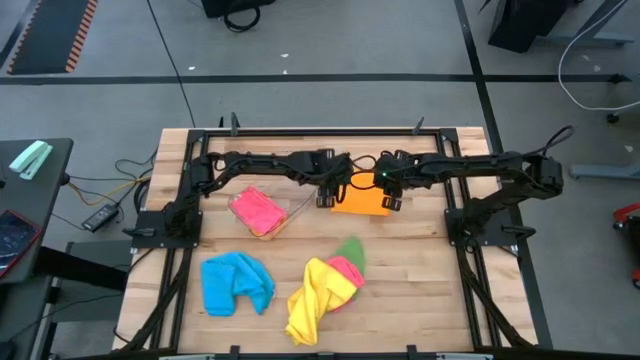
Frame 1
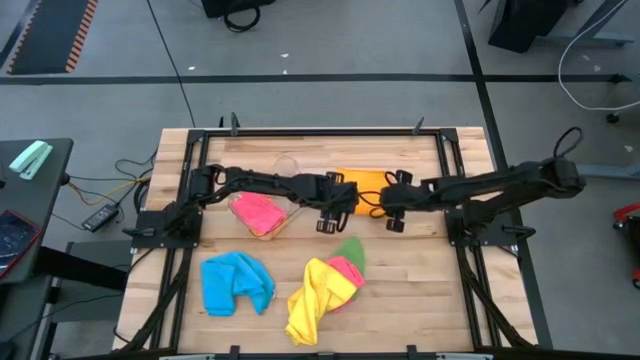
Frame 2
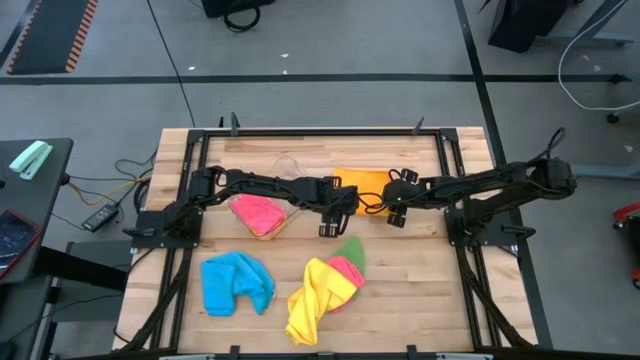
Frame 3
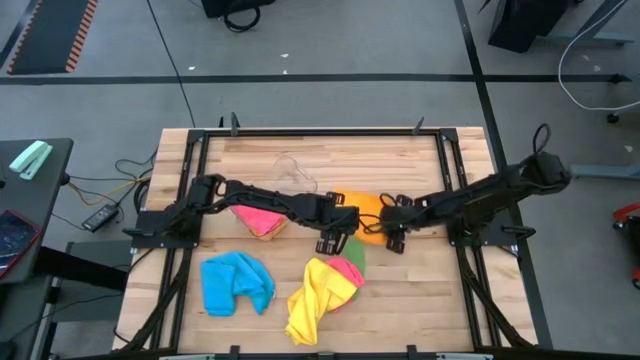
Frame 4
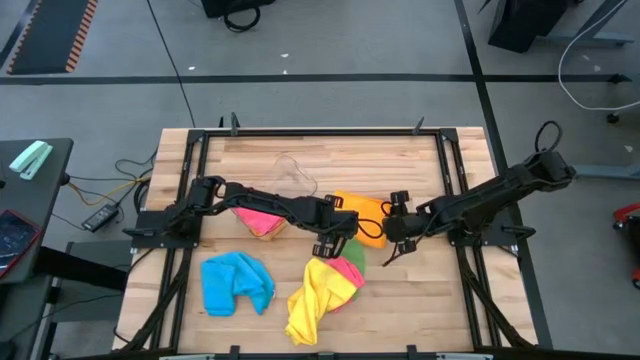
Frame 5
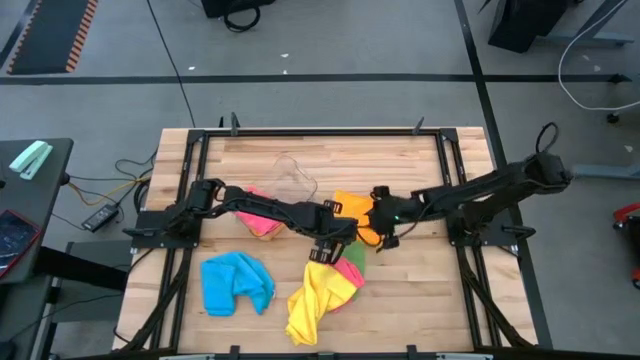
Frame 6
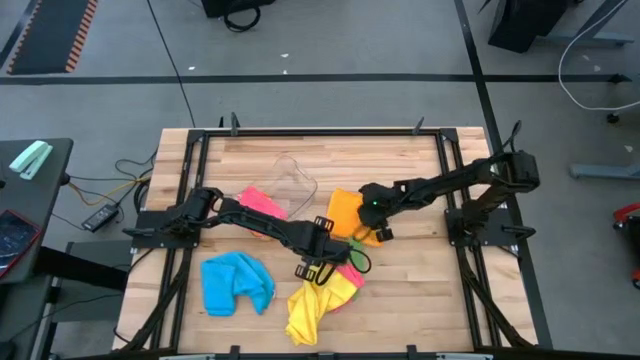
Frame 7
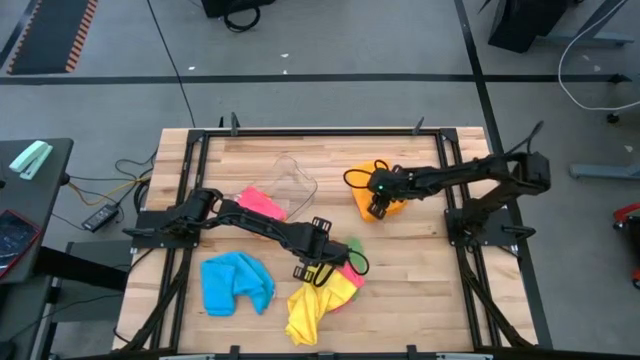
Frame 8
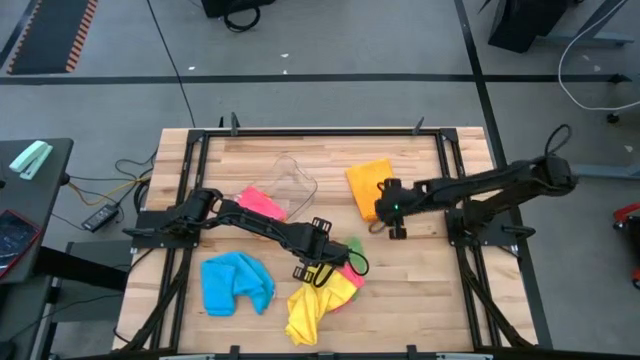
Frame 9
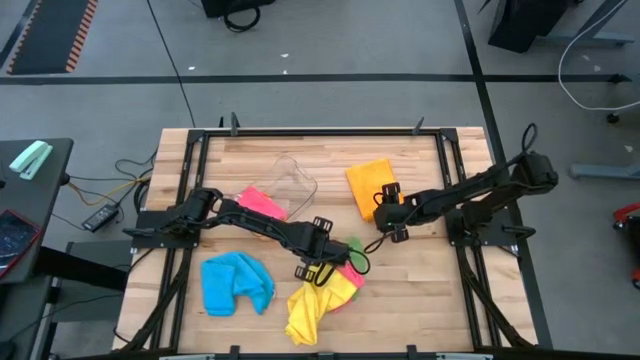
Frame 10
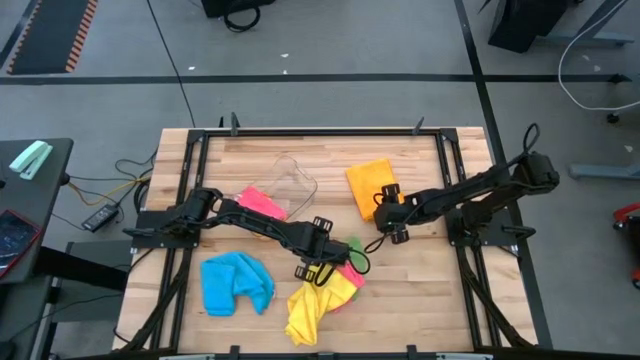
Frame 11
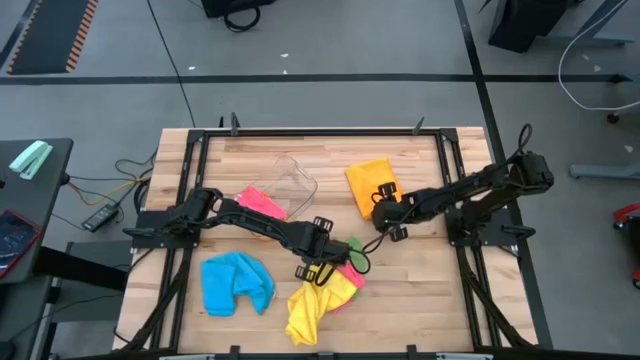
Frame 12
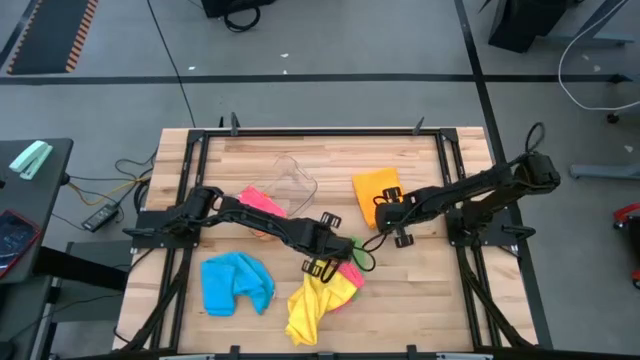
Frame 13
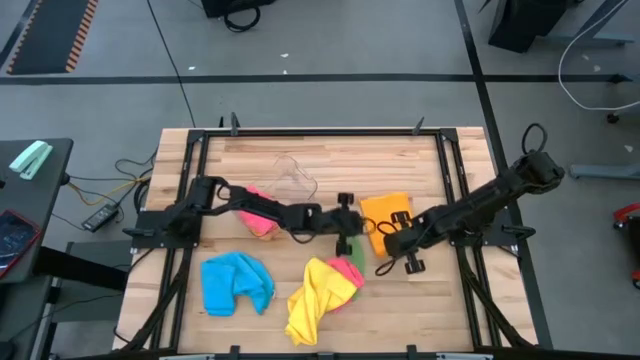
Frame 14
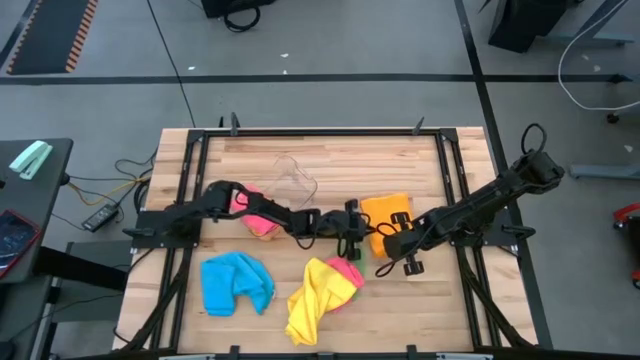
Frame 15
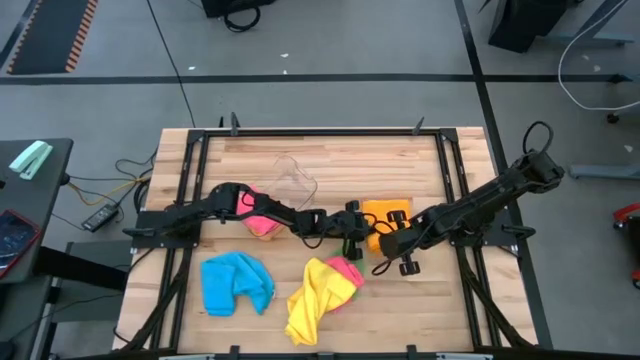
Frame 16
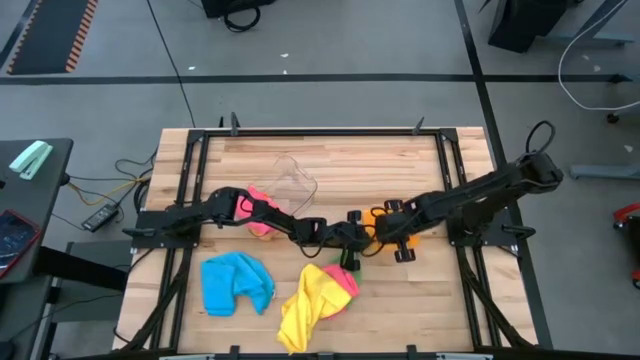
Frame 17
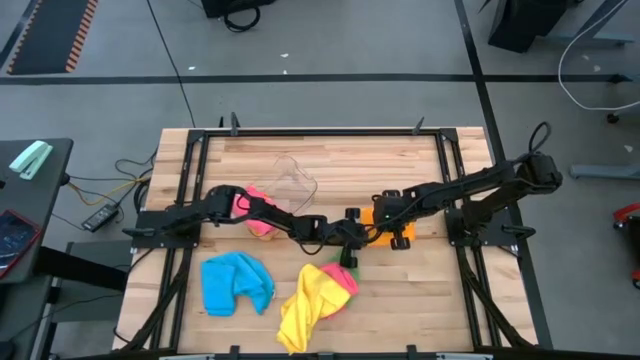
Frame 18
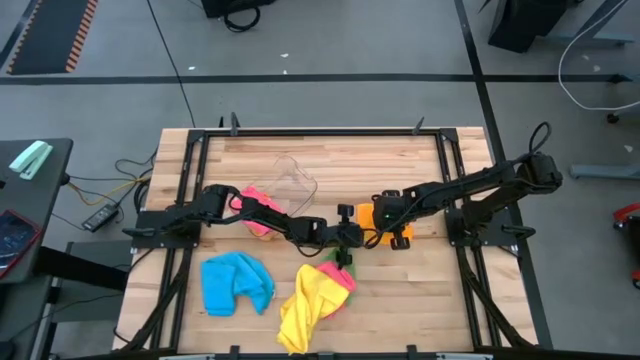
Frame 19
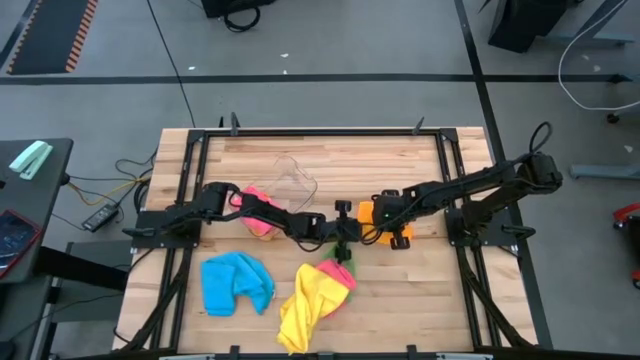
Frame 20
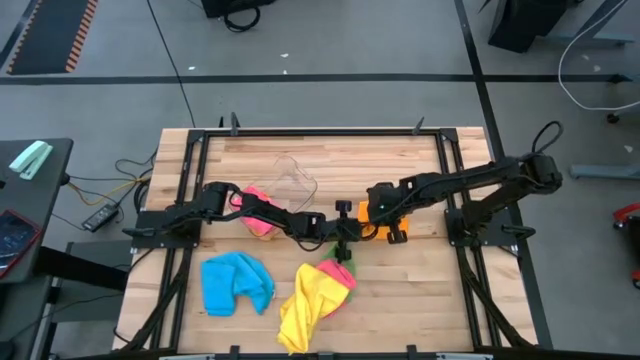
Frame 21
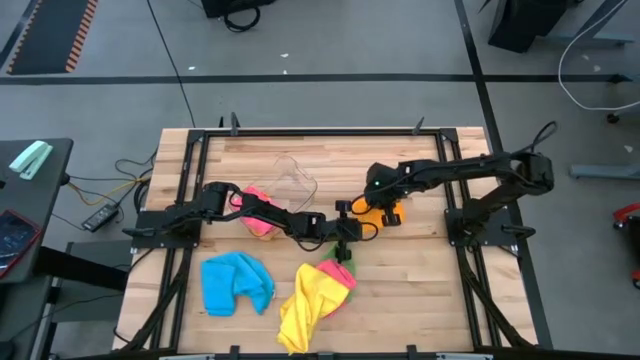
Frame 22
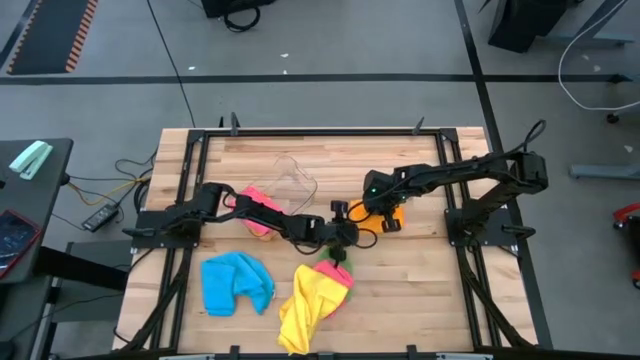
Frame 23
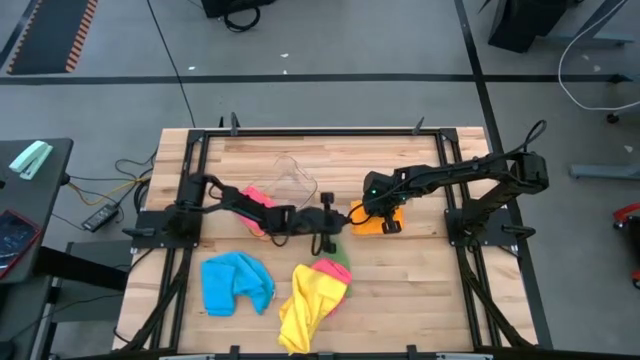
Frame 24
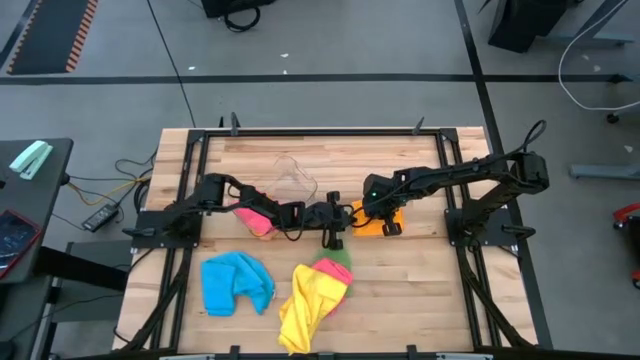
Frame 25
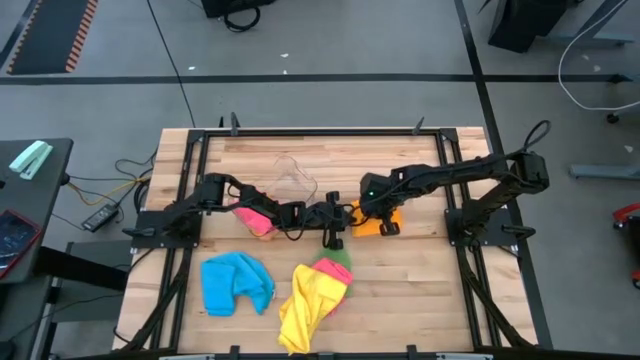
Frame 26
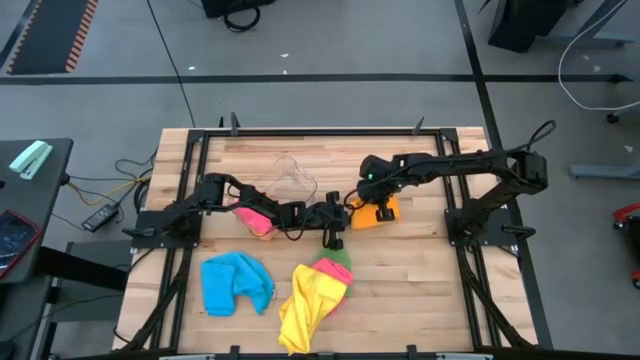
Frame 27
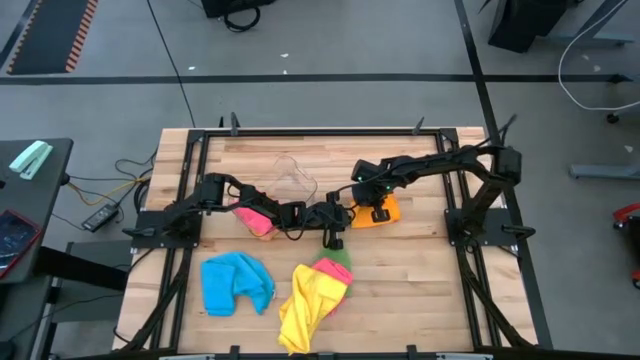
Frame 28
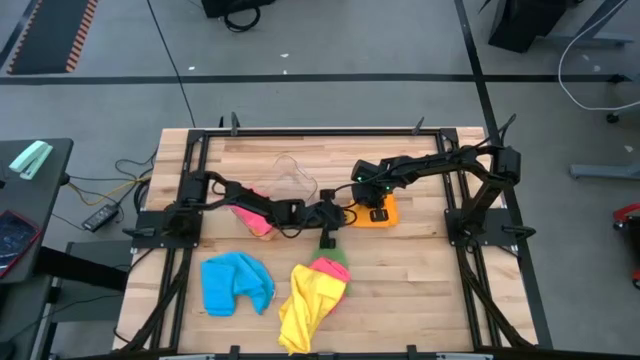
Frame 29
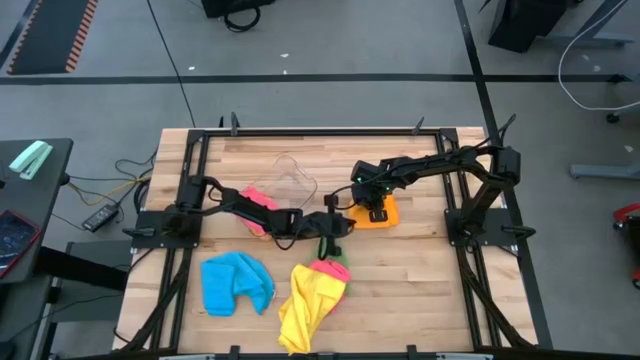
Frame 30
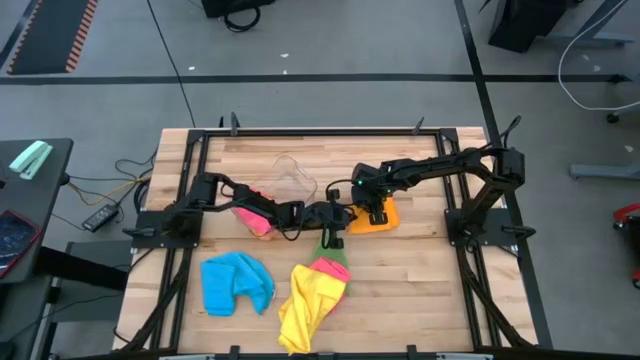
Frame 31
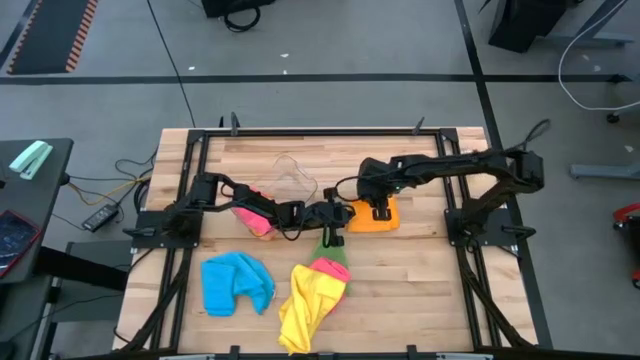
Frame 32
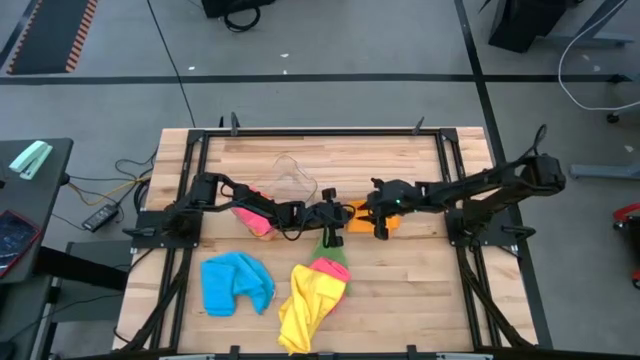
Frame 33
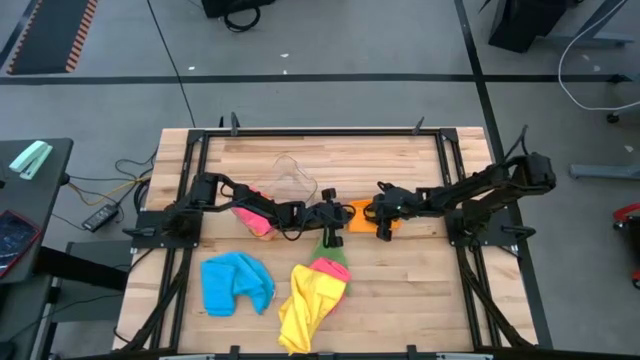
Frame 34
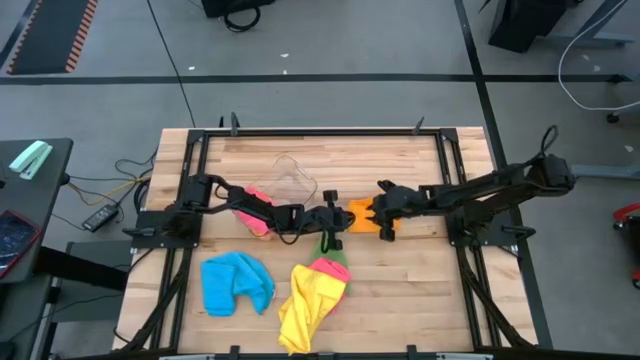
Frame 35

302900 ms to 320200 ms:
Task: Fold microfiber towels
Fold the orange microfiber towel
